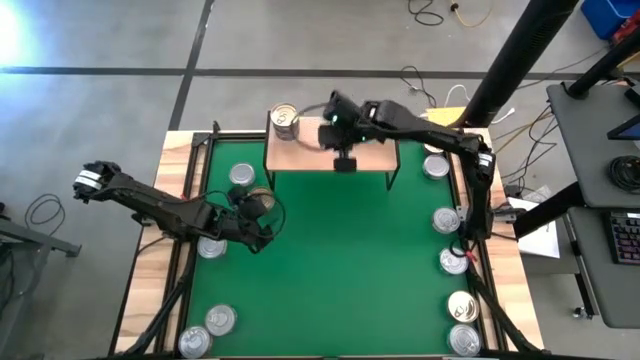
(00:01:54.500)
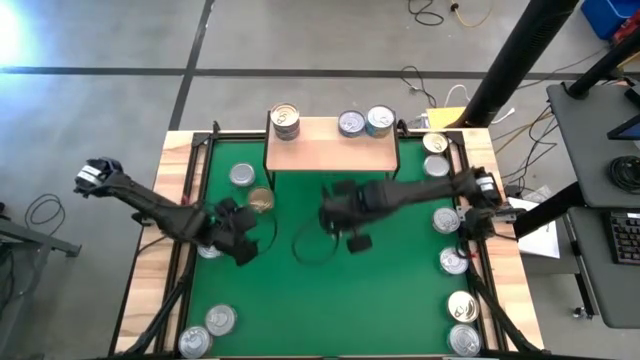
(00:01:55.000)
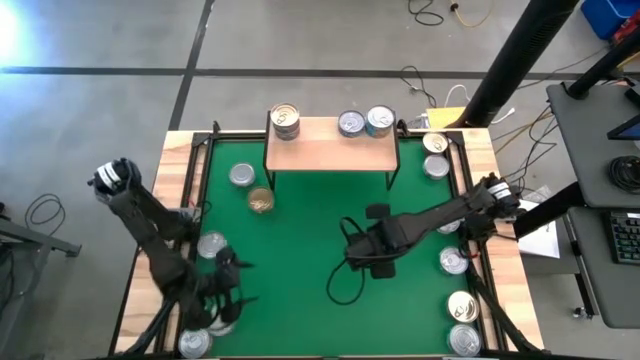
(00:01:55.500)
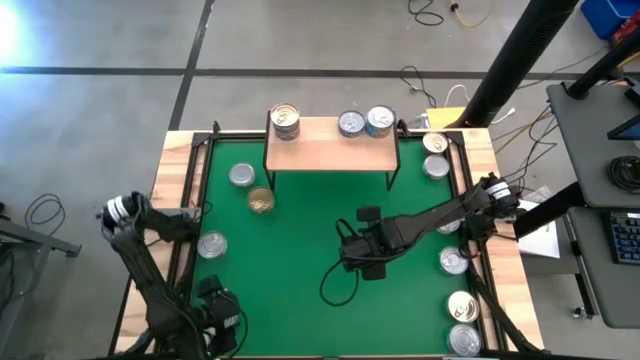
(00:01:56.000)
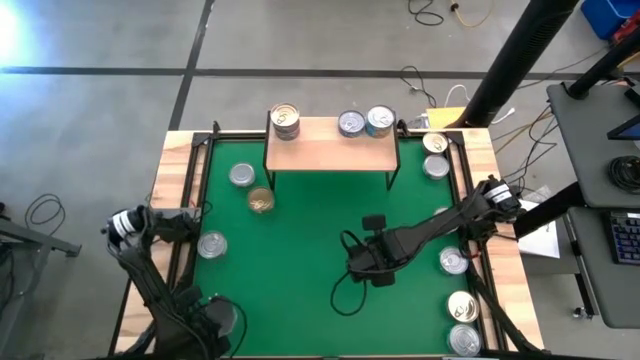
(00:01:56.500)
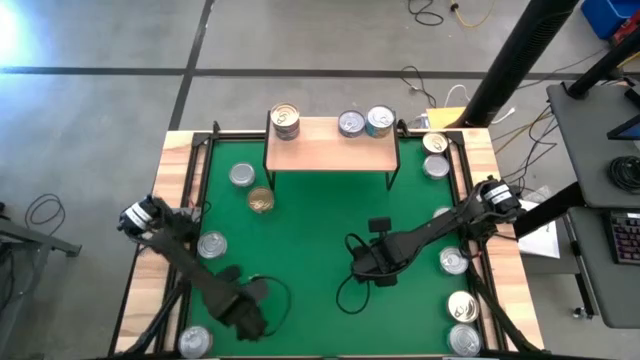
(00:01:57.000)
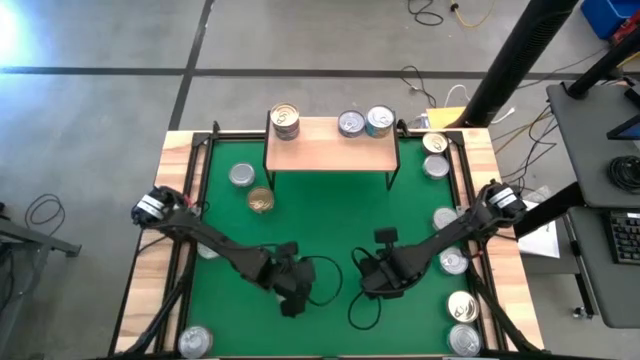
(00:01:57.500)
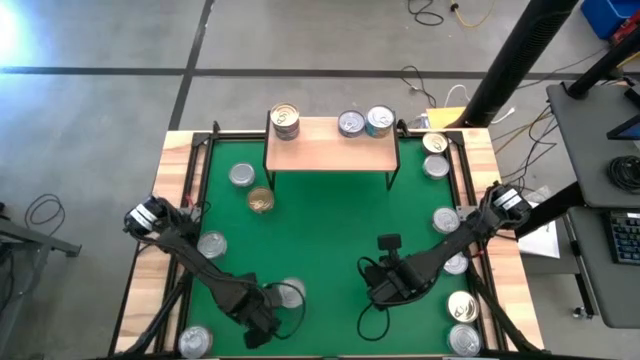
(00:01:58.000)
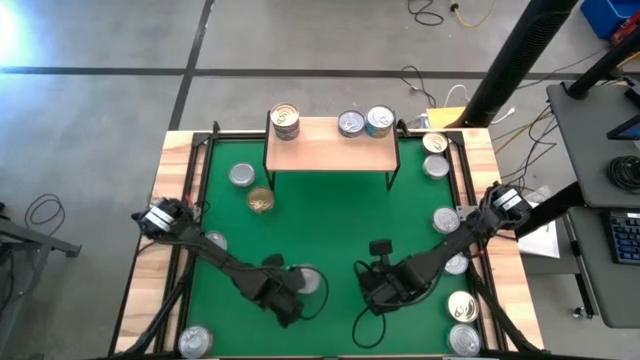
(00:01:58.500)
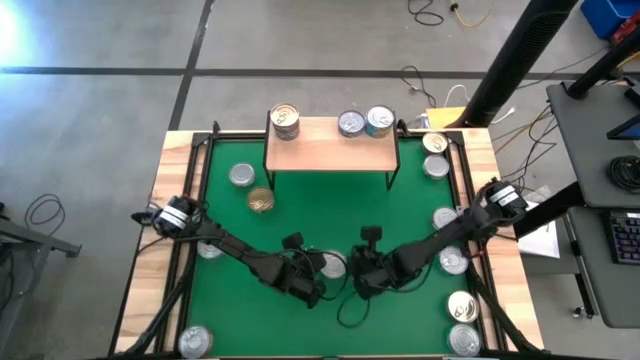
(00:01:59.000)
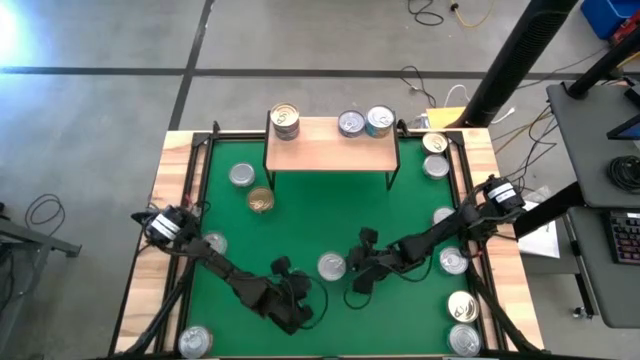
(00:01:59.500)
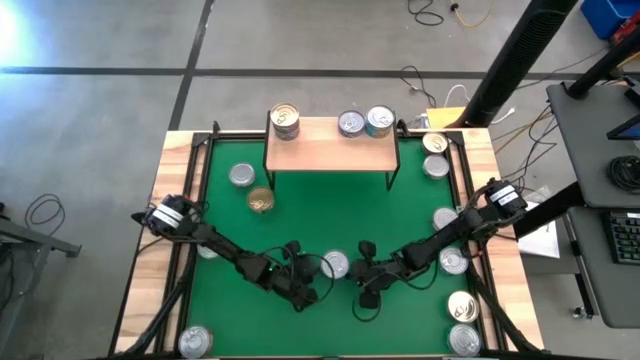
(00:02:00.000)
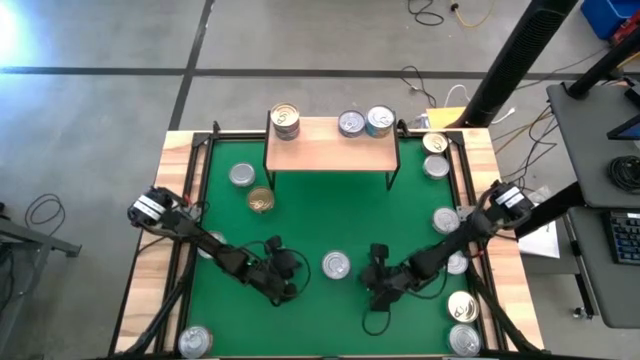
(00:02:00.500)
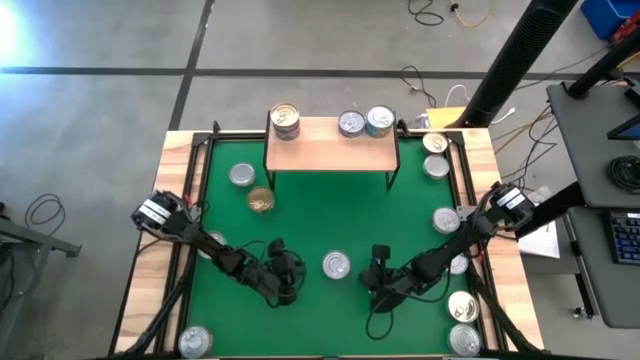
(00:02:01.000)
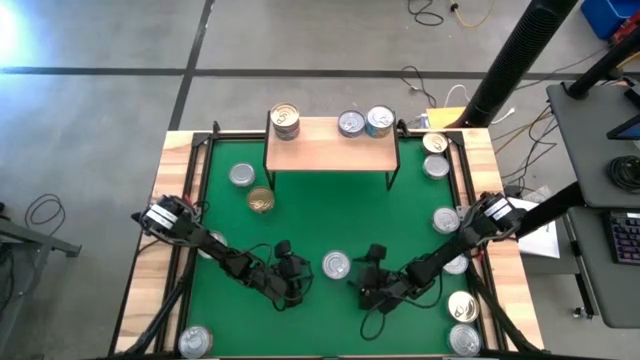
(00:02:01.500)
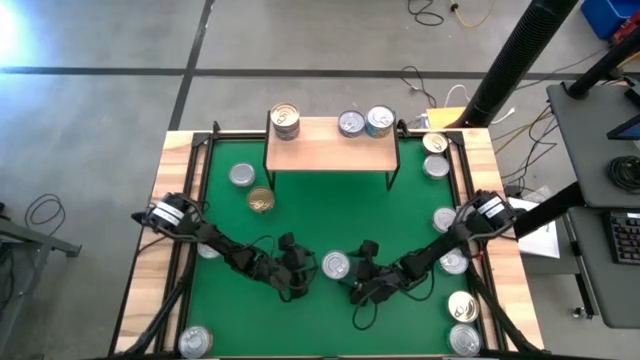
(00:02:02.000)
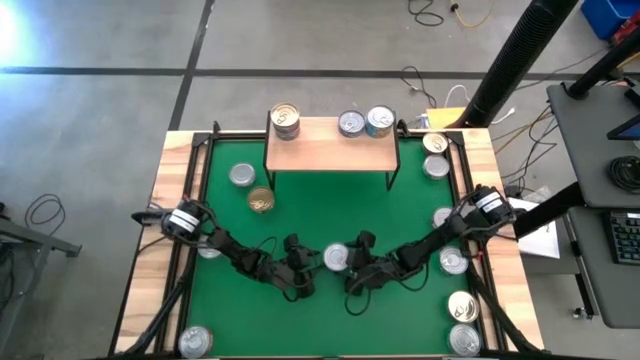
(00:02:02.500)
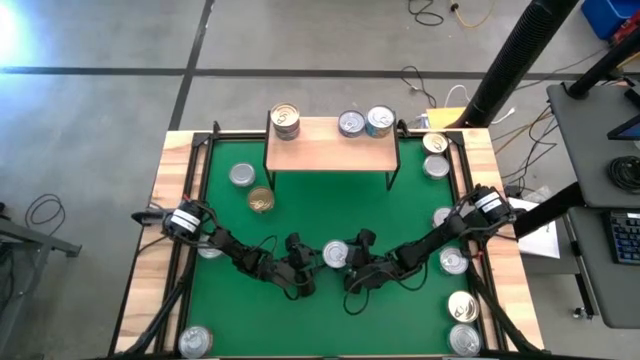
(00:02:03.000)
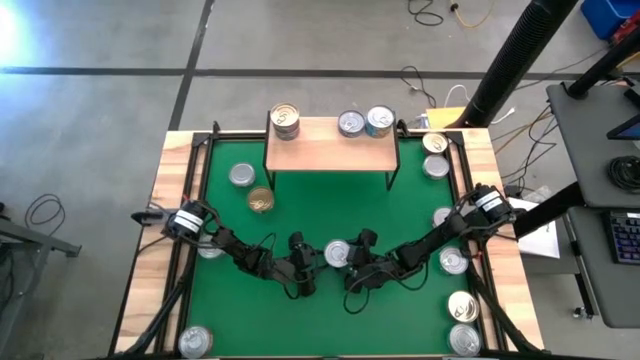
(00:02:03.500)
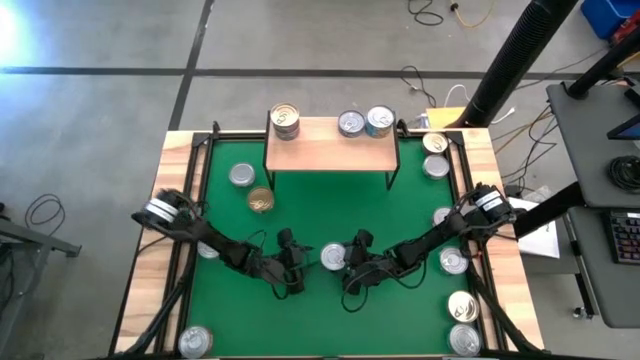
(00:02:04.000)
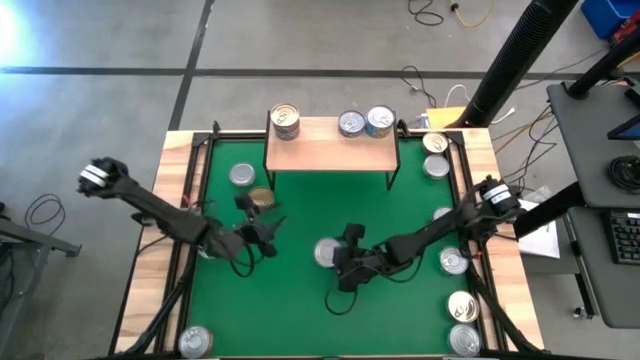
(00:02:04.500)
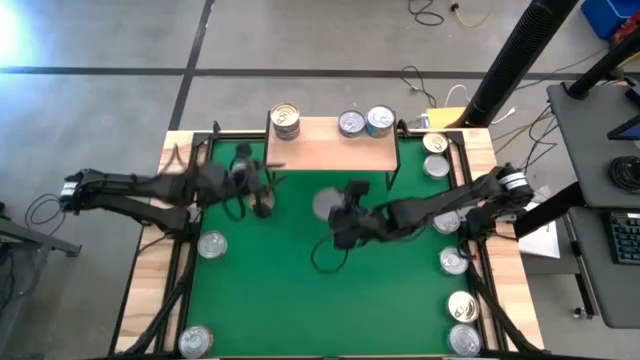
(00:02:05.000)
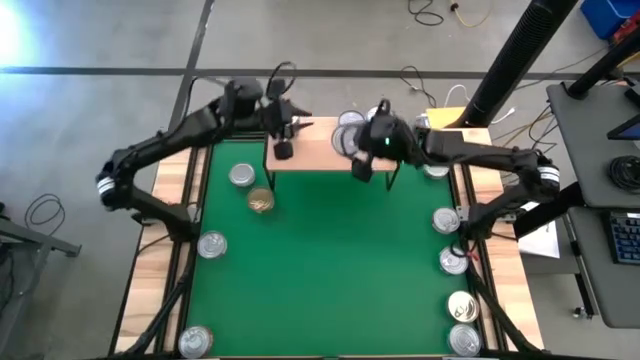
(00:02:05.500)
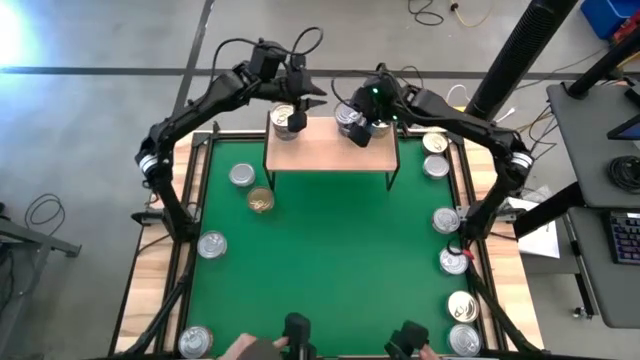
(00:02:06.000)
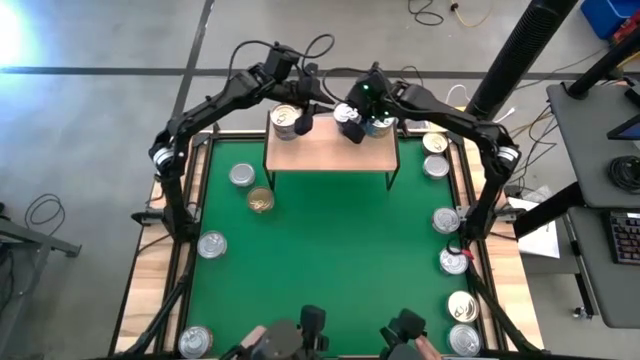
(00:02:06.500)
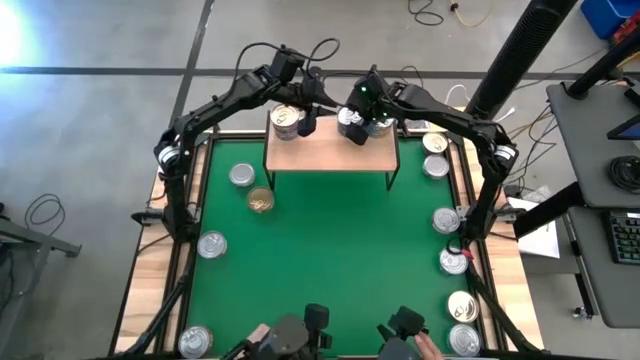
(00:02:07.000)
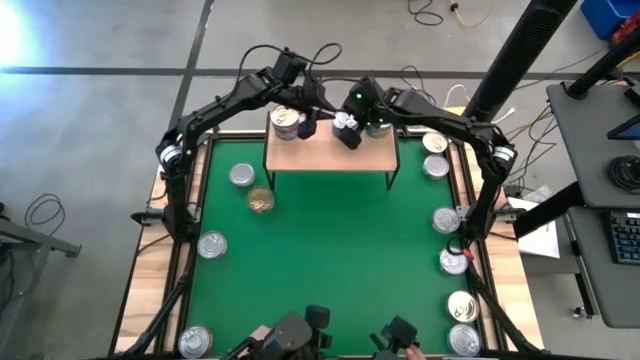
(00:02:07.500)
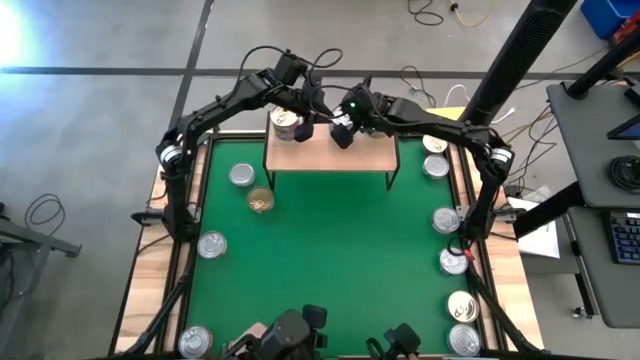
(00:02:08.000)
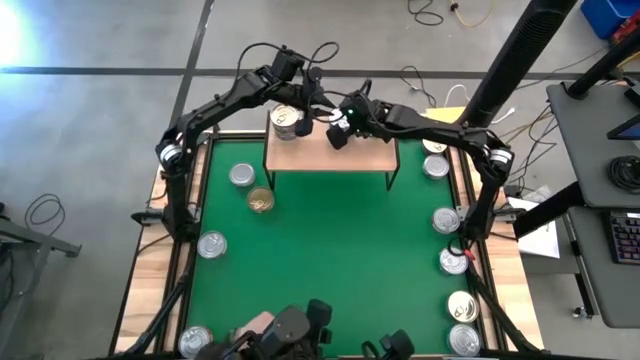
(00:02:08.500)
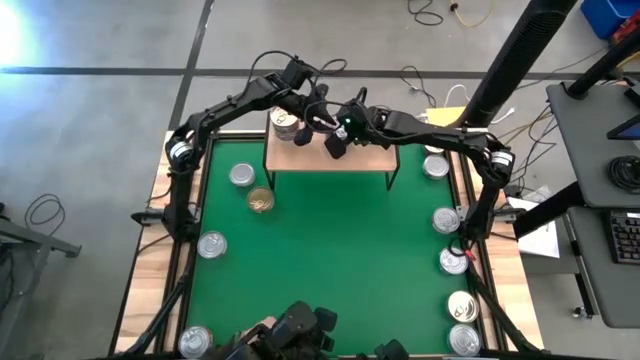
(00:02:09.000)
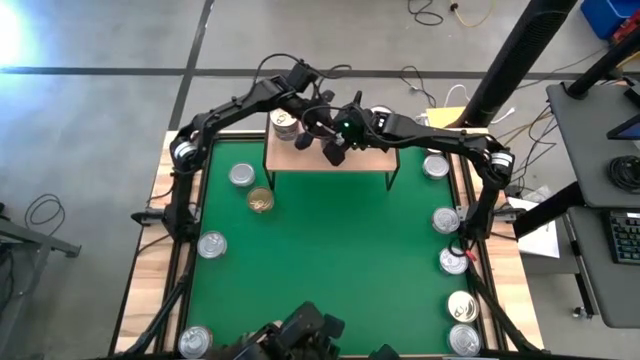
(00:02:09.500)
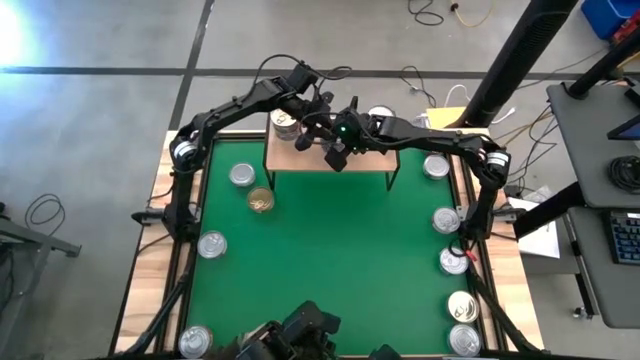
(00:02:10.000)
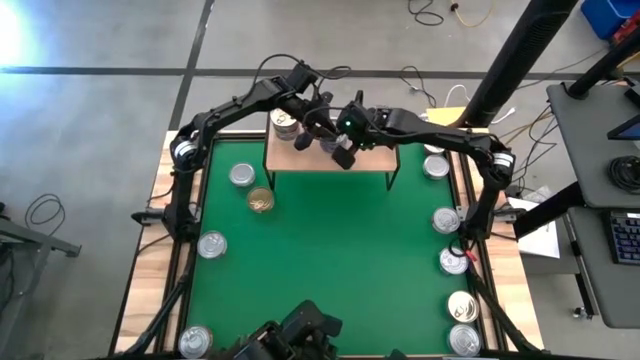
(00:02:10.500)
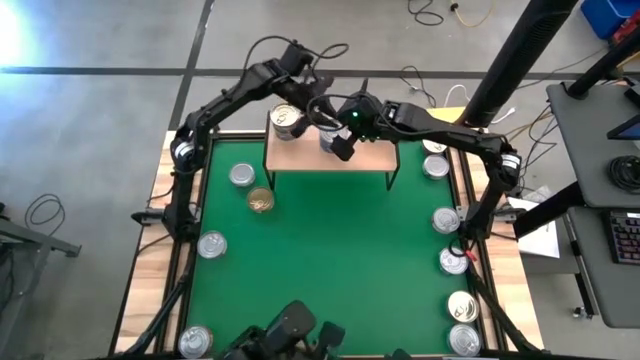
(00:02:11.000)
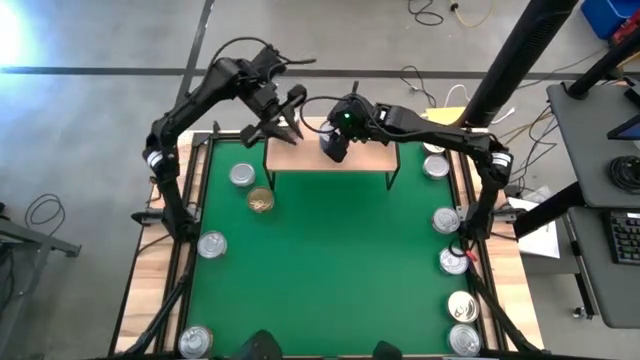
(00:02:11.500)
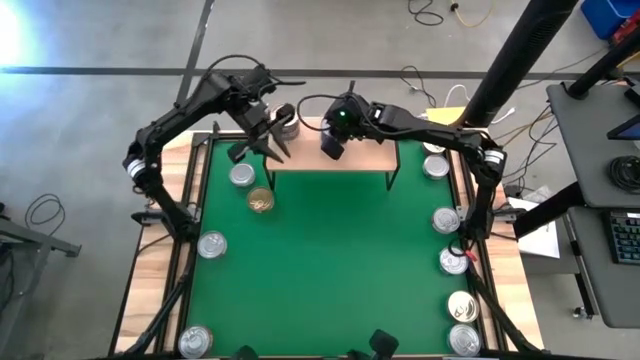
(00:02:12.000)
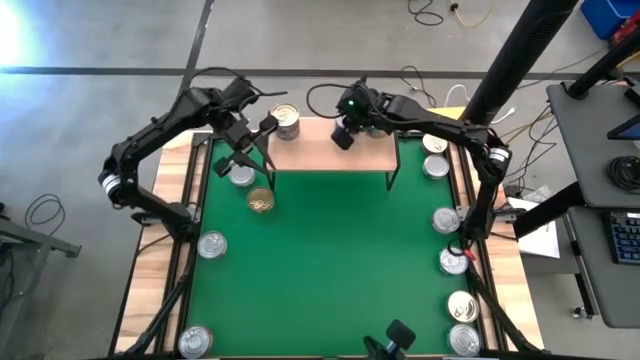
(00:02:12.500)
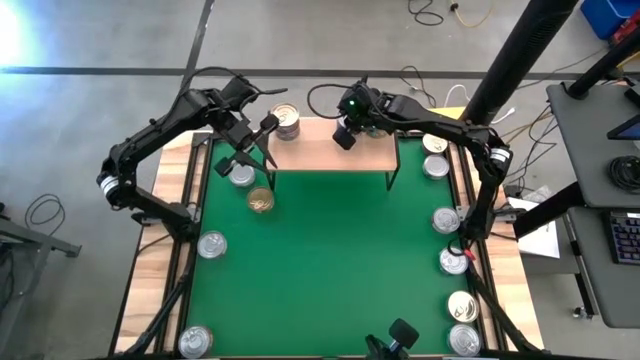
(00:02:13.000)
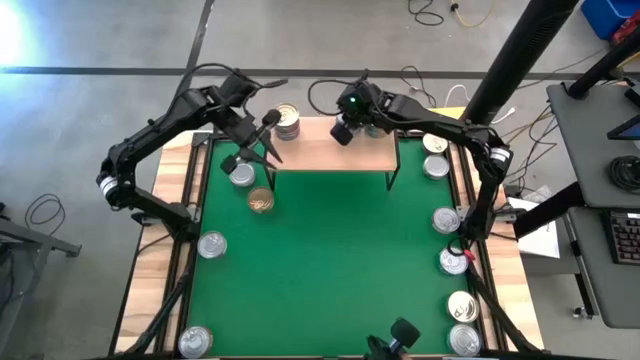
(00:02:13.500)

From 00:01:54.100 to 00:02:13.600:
Task: Stack canned seafood by type on shelf
Stack the blue tuna can on top of the blue tuna can on the shelf

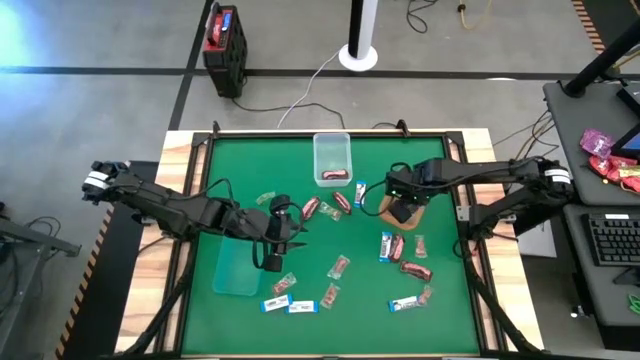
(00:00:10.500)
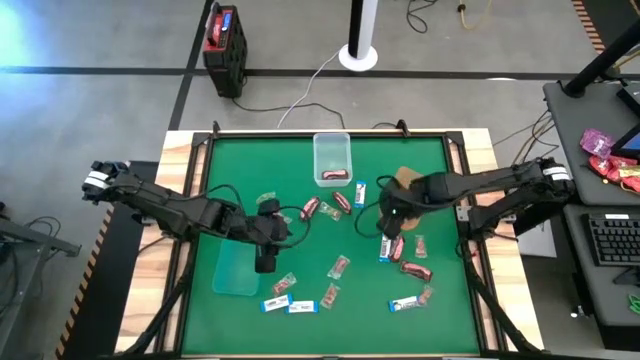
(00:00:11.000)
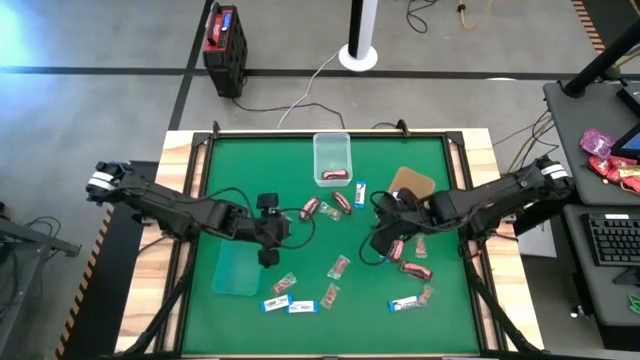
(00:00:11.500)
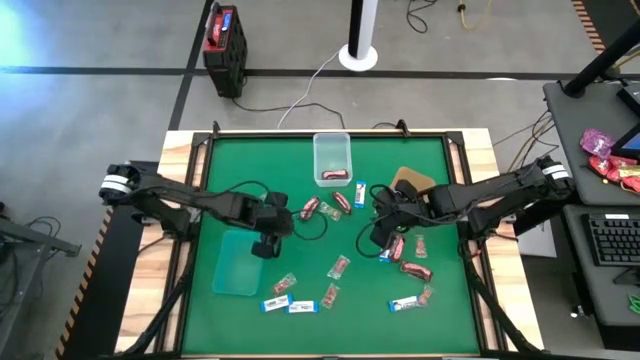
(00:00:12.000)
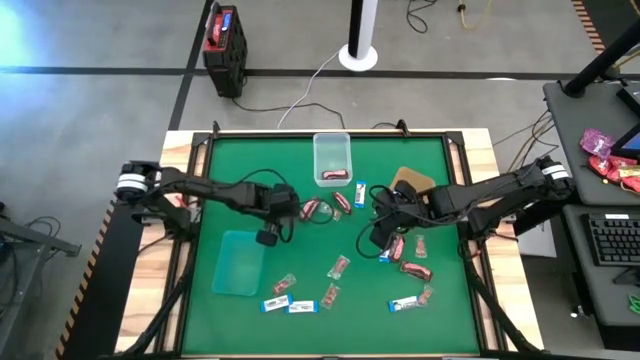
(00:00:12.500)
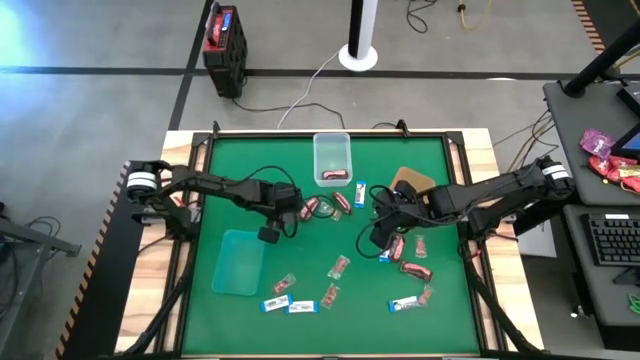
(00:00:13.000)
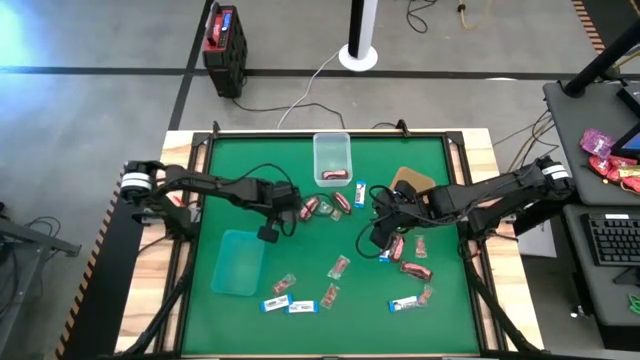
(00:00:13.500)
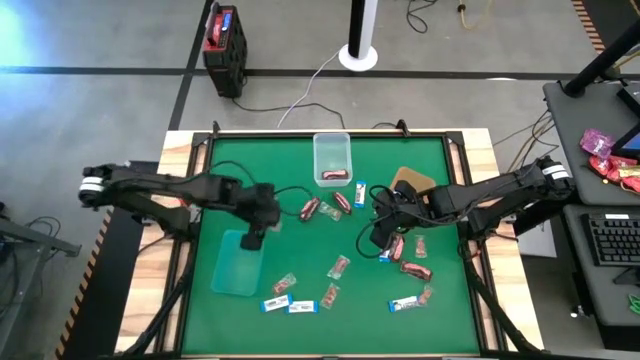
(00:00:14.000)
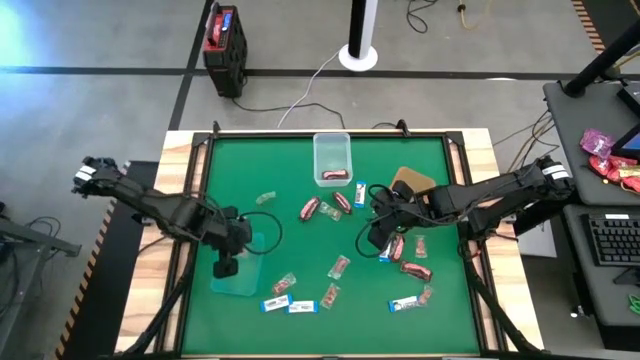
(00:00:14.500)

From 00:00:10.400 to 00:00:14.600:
Task: Sort candy by brand, put in halloween buckets
Put the orange gummy candy into the blue bin
